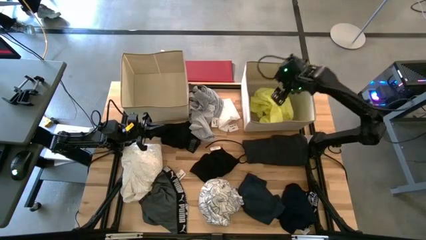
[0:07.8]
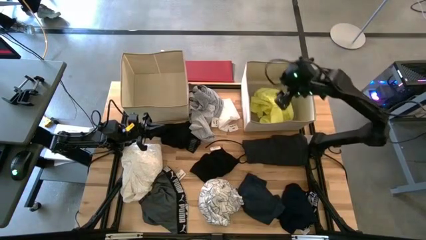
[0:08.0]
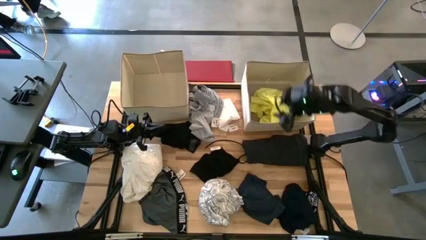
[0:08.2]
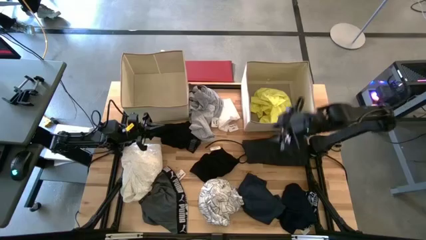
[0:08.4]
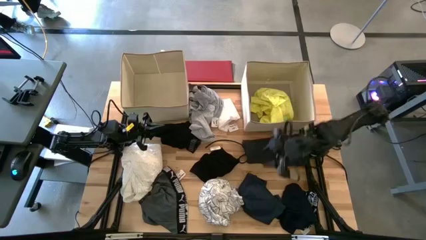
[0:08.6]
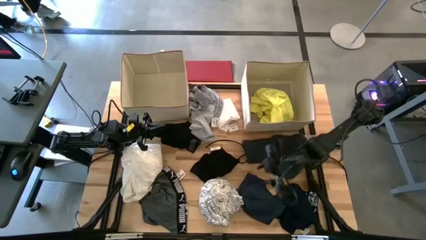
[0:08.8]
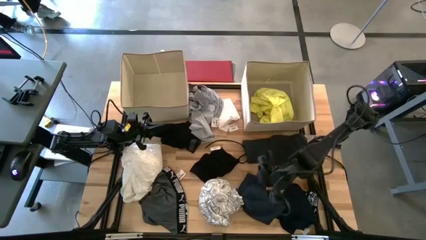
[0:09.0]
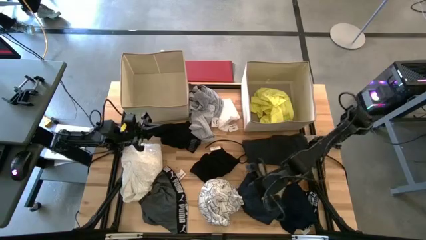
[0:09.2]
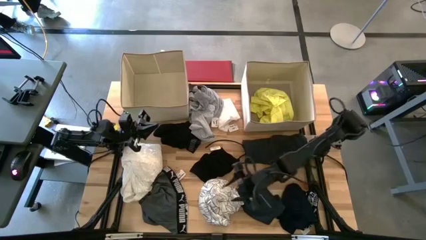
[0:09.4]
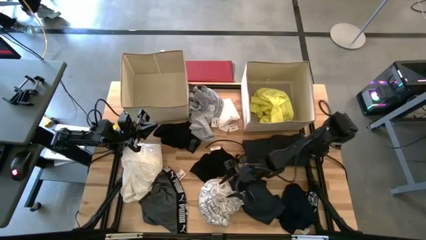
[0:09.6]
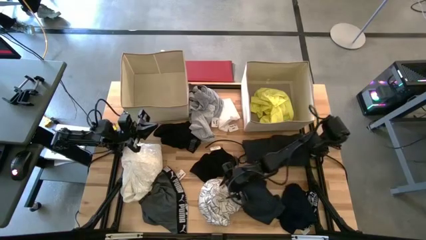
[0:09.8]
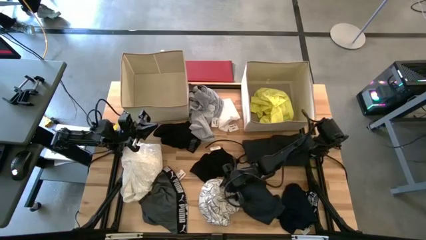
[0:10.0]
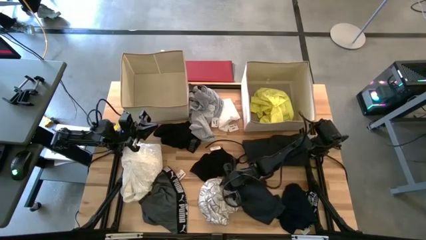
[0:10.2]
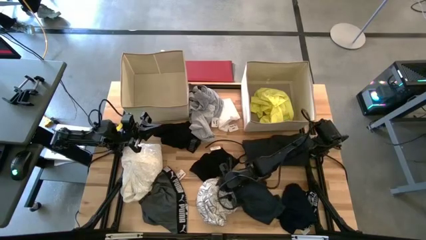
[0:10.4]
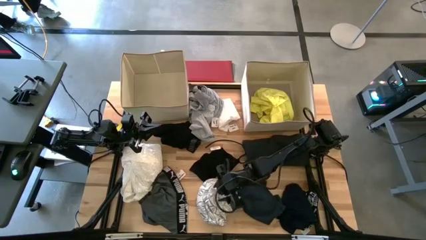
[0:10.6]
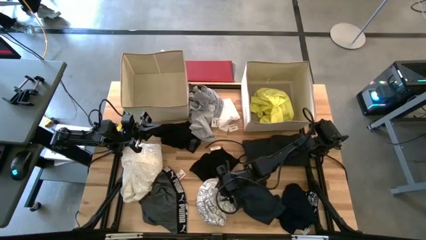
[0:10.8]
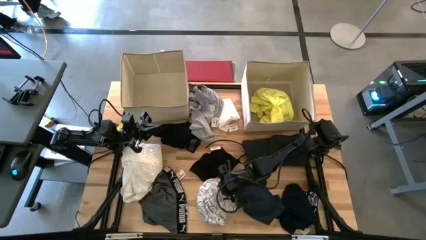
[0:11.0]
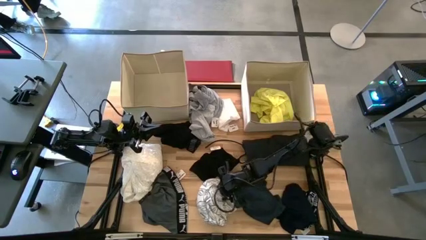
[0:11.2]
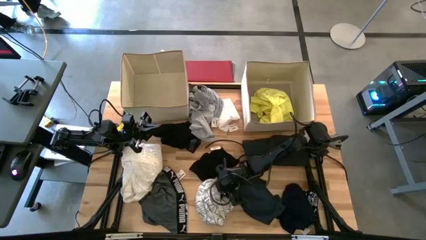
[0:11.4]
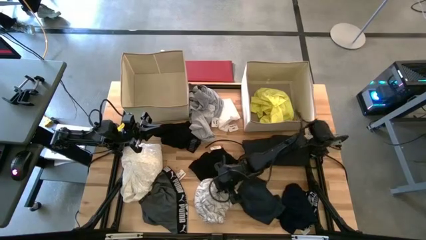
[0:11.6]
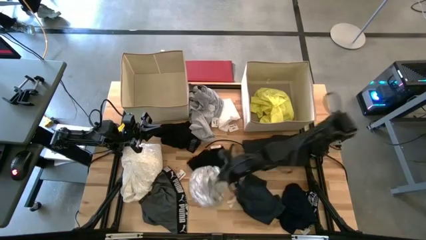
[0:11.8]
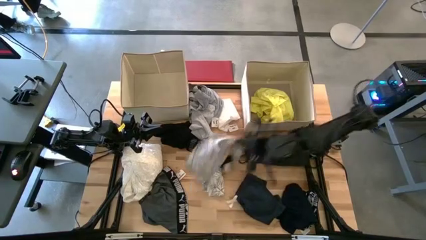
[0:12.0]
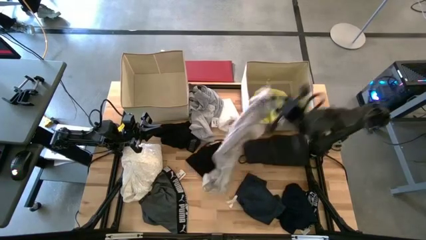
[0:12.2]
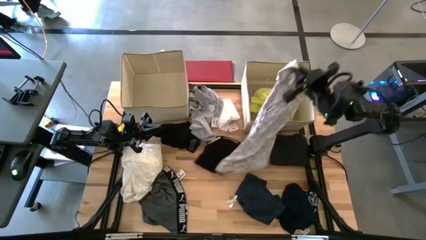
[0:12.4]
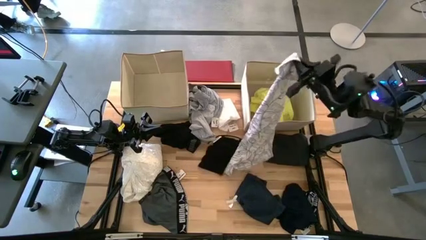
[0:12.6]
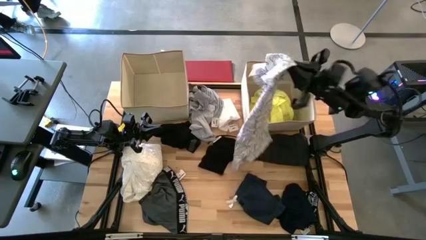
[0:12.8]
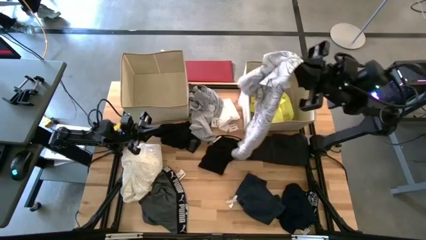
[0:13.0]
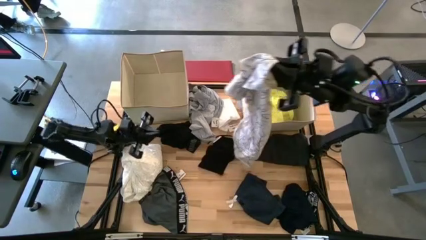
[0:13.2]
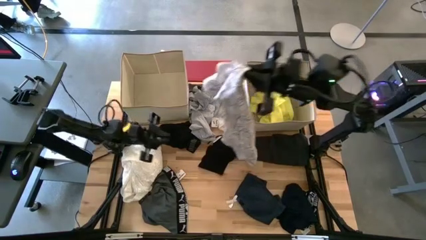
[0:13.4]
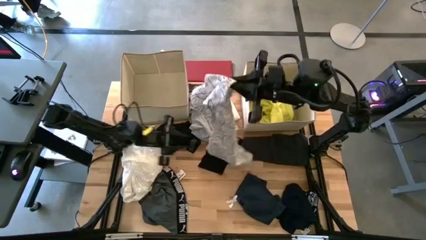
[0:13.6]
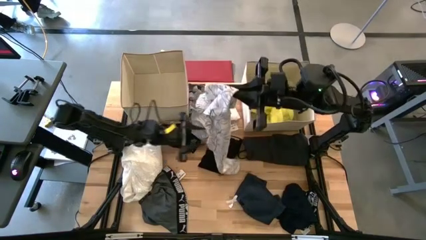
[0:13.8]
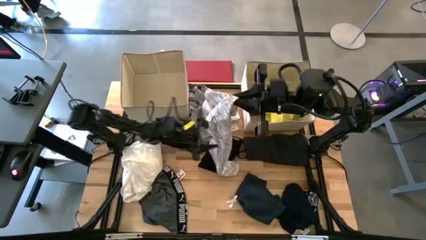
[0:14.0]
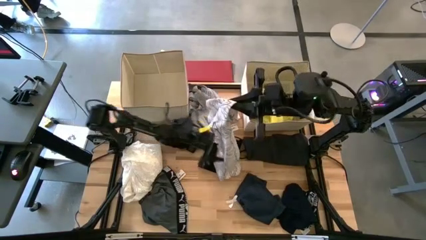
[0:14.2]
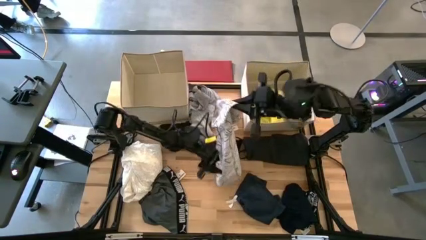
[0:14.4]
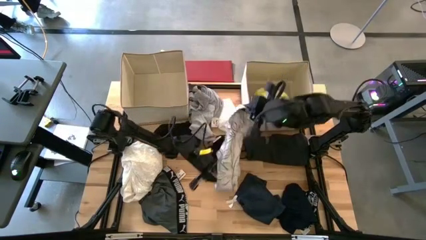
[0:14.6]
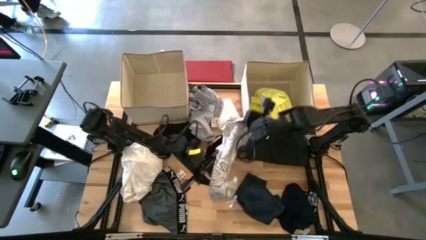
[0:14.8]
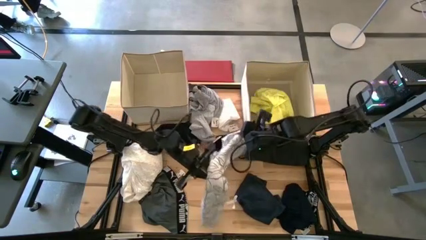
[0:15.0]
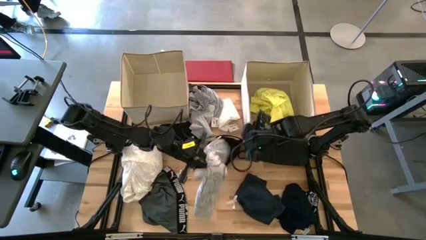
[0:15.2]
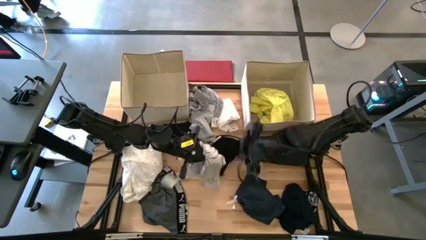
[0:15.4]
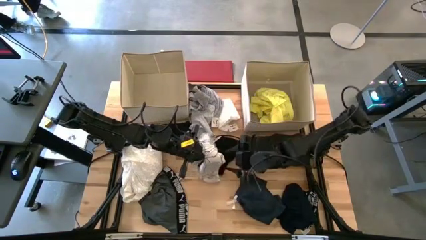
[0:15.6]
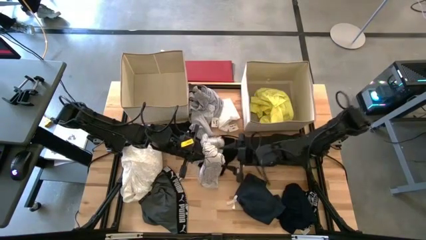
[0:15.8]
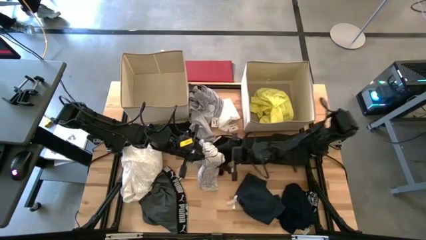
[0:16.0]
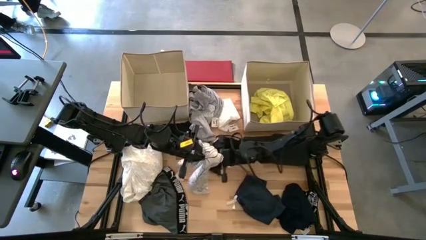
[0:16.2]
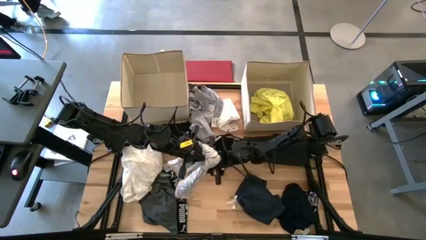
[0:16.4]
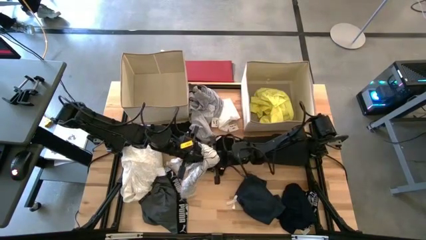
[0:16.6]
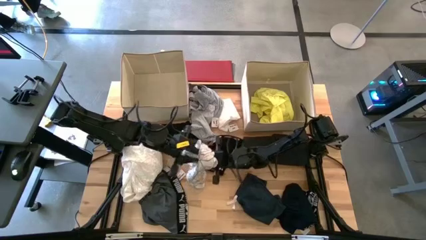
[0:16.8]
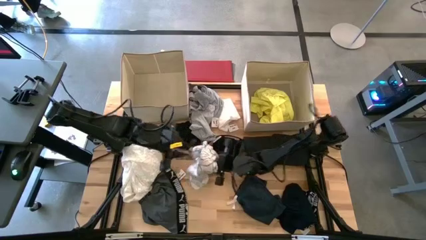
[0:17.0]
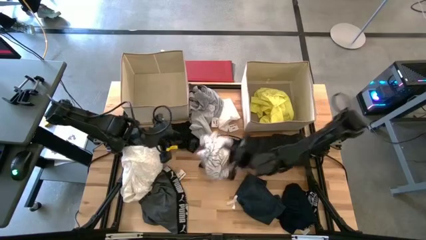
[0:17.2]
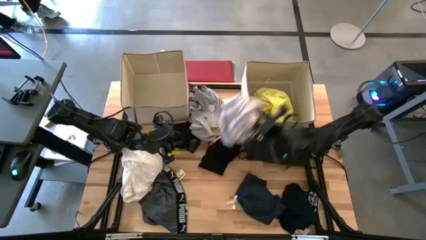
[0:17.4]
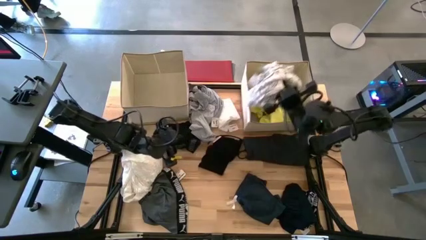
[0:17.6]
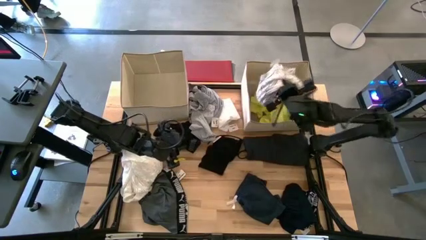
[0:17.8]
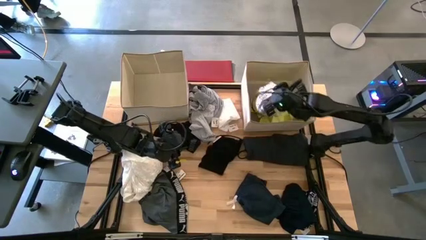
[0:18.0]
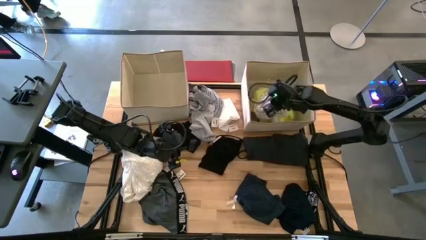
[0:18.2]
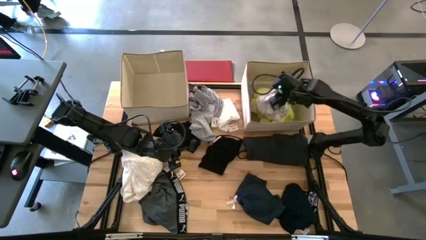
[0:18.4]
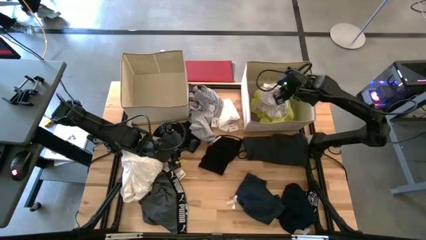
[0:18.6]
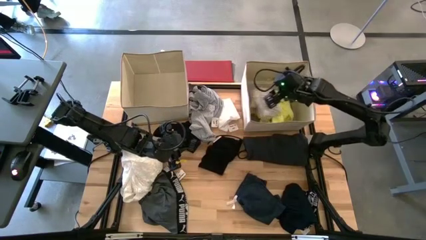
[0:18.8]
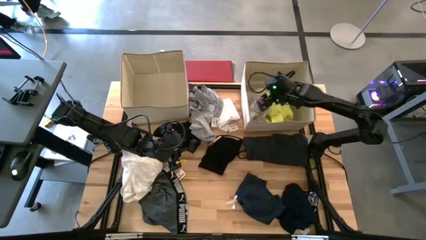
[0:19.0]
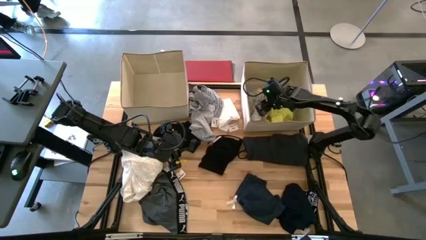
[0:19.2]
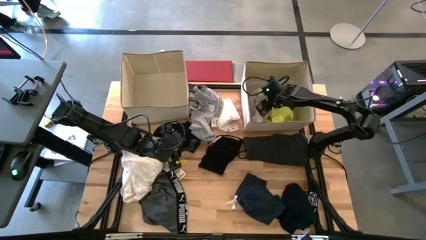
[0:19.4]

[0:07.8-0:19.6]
Task: Sort clothes
Put the white polo shirt into the right laundry organizer

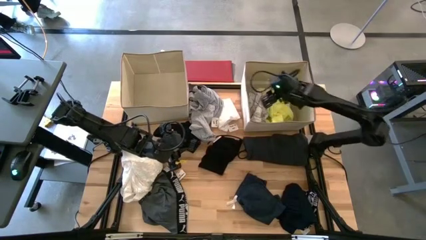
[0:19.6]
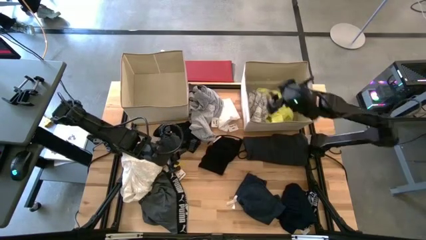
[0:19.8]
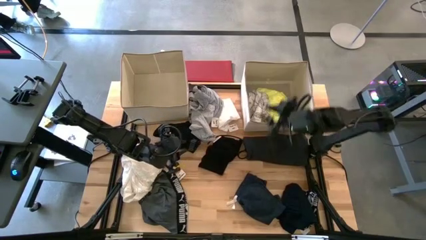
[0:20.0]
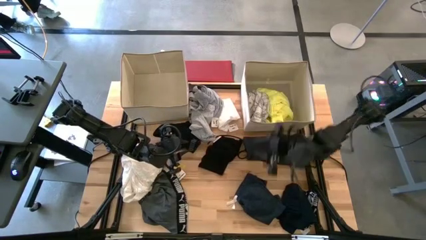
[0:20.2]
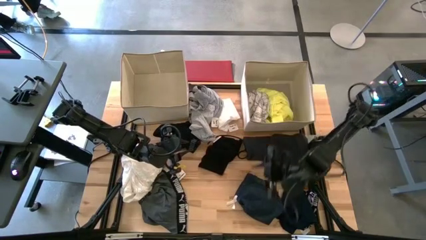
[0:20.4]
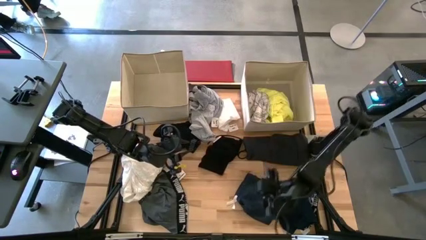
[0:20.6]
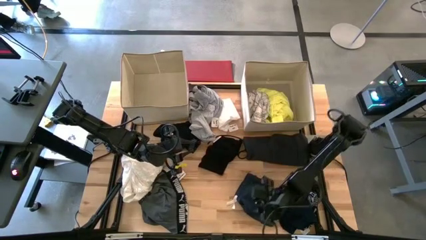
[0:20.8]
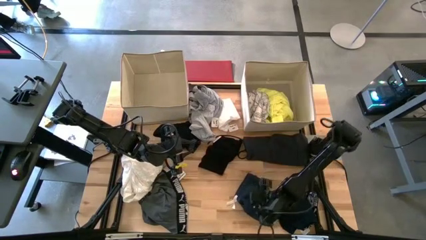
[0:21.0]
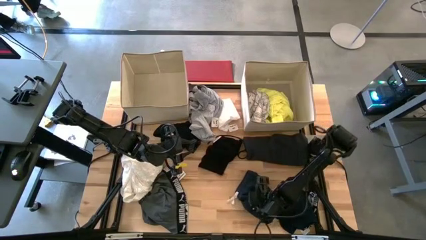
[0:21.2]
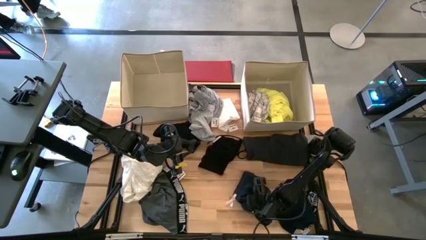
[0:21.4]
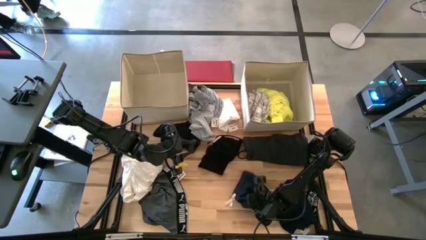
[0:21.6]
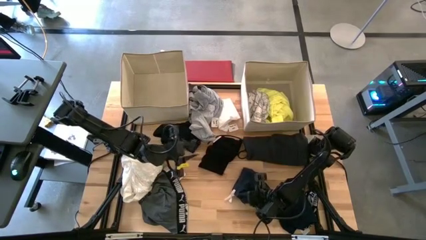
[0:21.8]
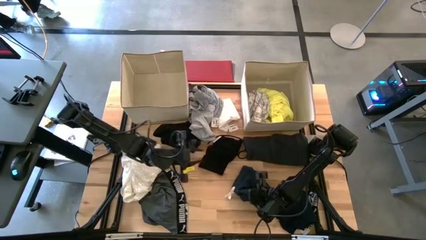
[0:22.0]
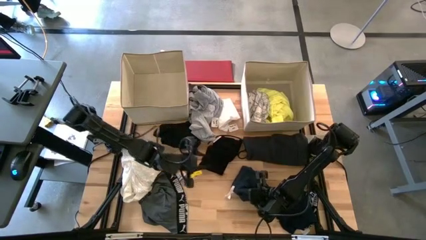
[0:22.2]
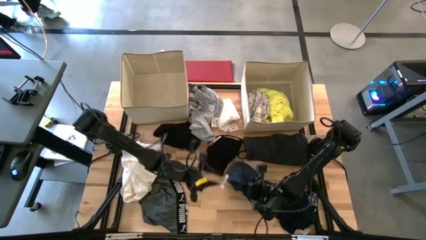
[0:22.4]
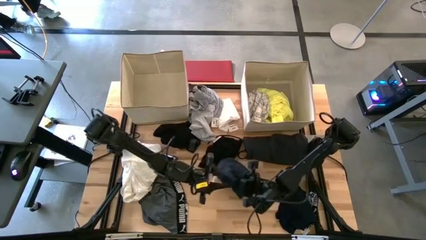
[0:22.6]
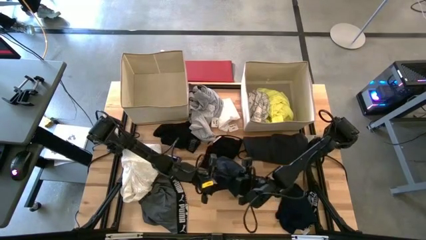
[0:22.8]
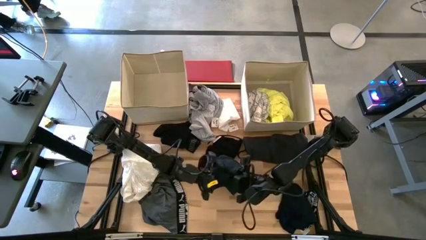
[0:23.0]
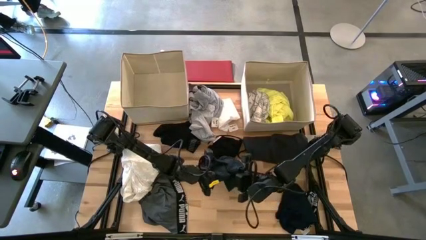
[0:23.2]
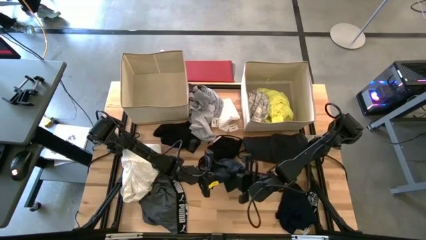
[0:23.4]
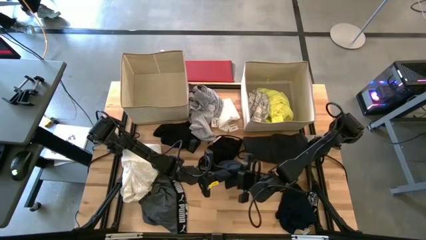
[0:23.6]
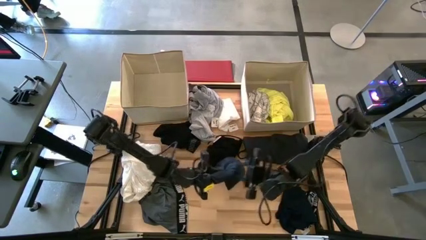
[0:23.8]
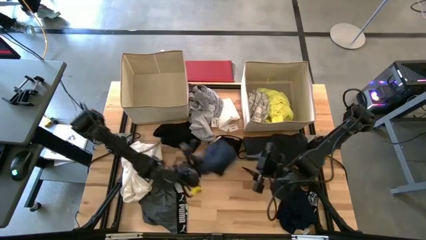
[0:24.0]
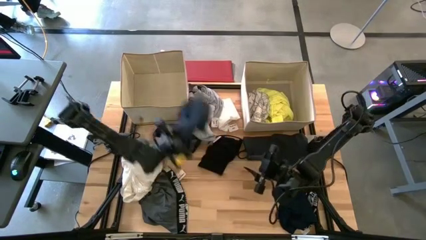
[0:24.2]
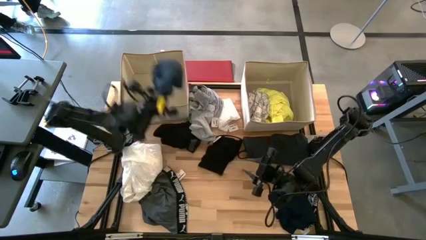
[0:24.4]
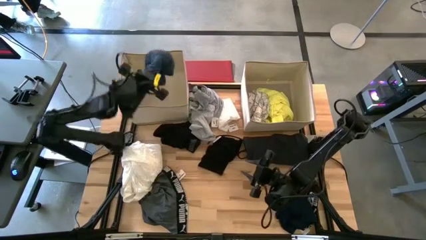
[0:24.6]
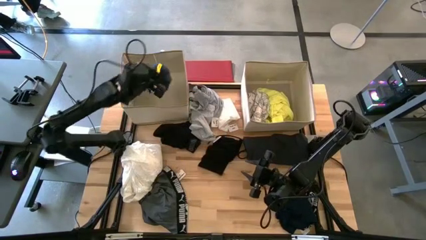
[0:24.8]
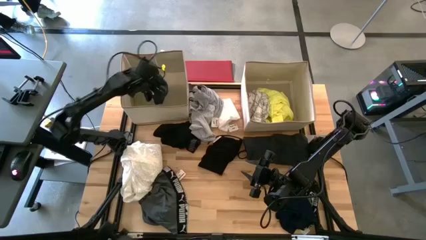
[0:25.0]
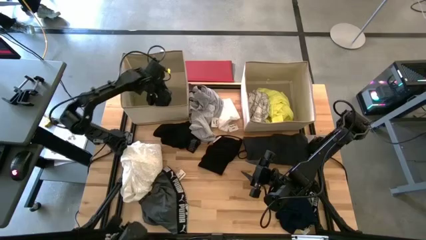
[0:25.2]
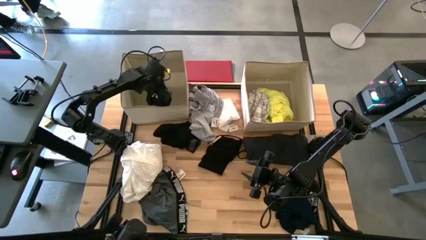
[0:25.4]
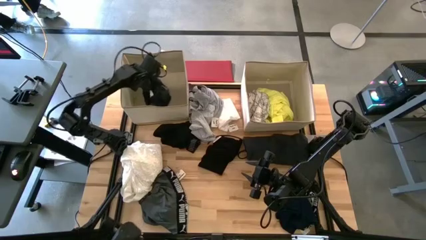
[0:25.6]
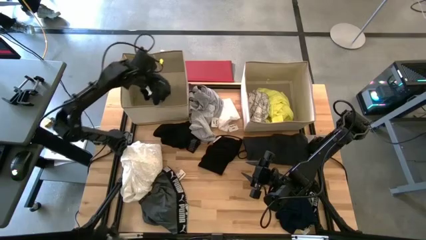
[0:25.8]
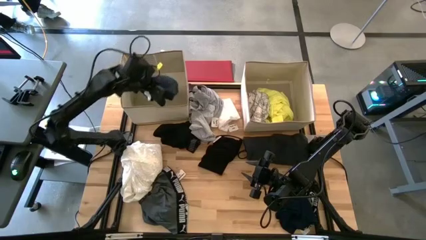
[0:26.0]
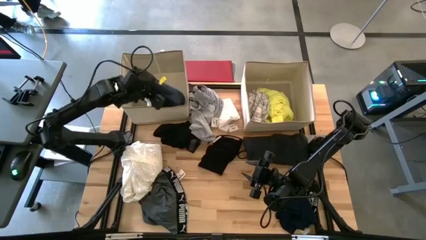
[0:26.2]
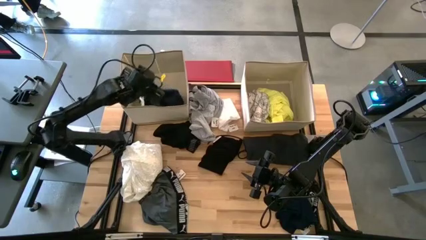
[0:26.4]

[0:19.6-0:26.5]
Put the dark blue pants into the left laundry organizer
